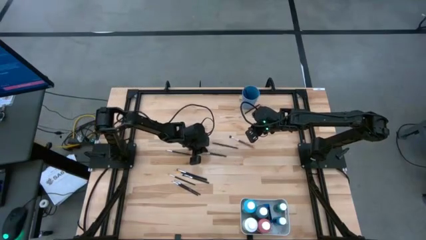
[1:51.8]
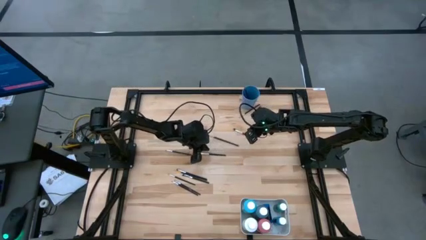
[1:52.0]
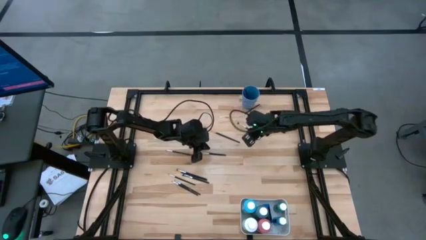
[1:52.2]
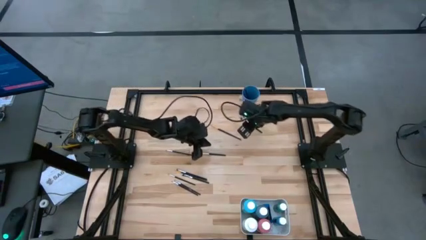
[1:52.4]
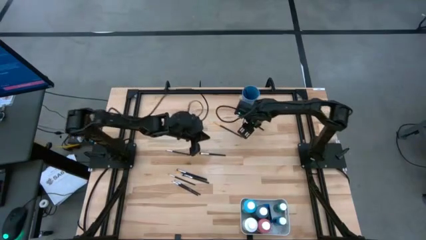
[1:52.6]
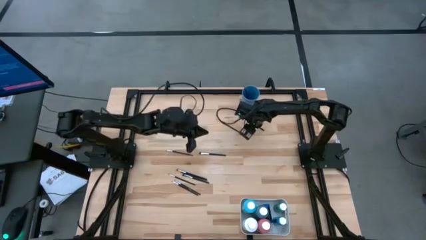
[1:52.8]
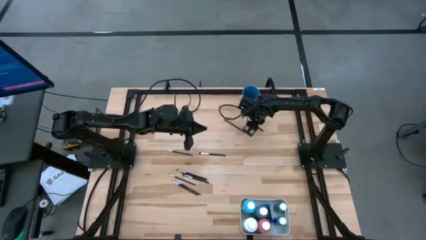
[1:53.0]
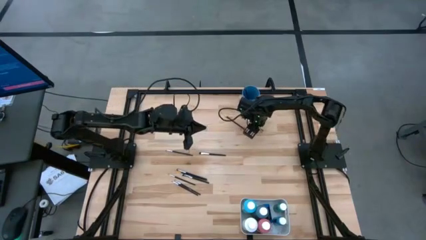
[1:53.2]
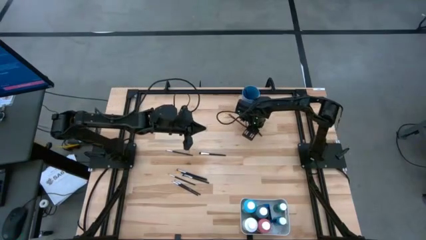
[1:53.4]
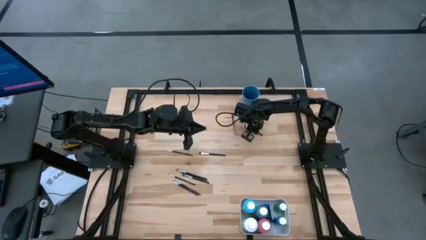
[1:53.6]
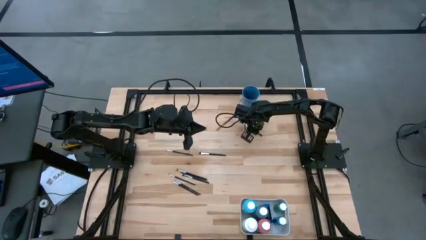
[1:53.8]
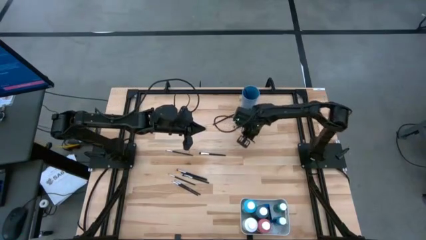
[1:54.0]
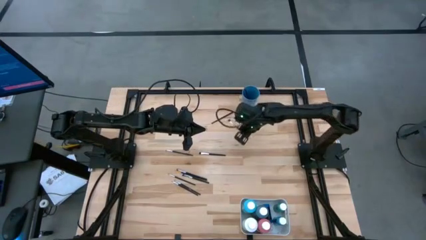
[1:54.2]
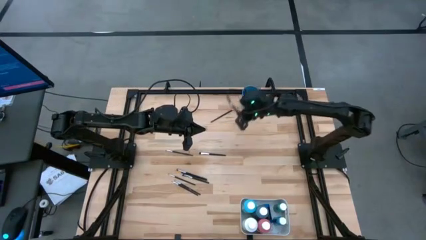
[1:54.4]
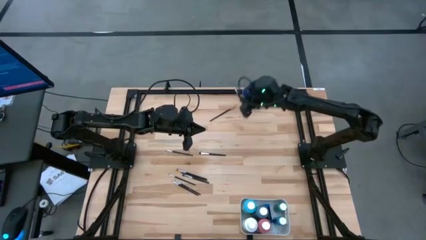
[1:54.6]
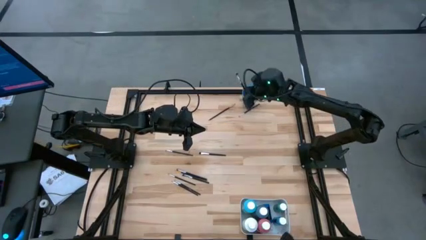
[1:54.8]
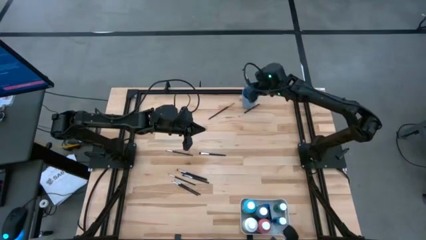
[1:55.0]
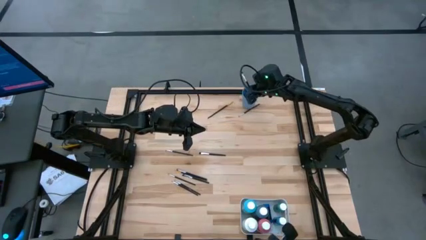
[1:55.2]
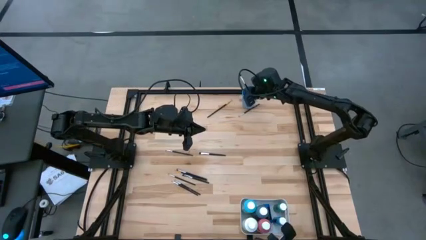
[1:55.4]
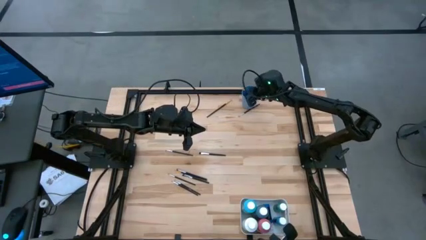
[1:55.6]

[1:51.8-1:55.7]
Task: Pick & Place Paint Supplies
Put the silver paintbrush into the blue cup

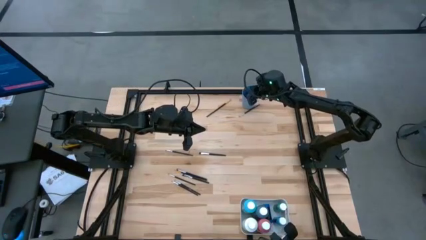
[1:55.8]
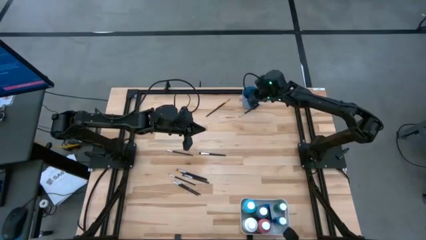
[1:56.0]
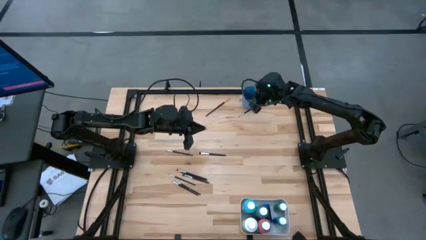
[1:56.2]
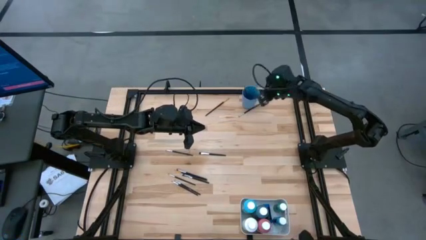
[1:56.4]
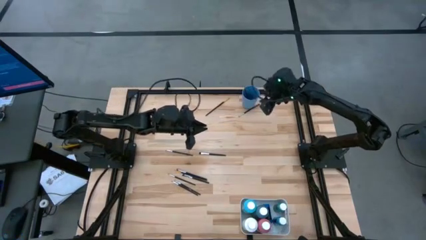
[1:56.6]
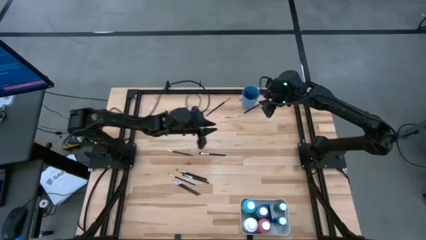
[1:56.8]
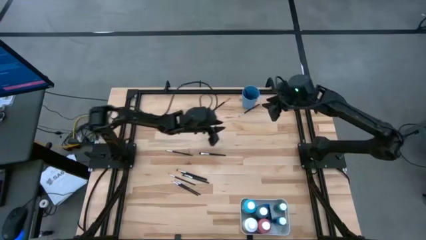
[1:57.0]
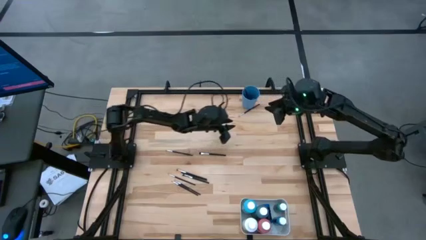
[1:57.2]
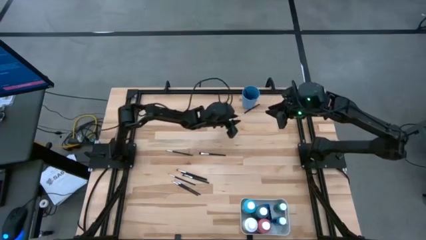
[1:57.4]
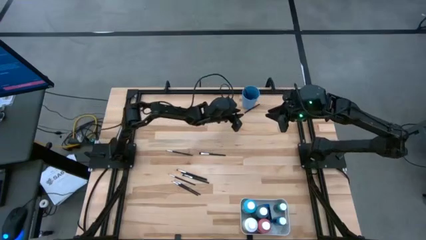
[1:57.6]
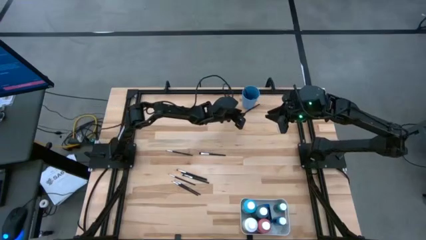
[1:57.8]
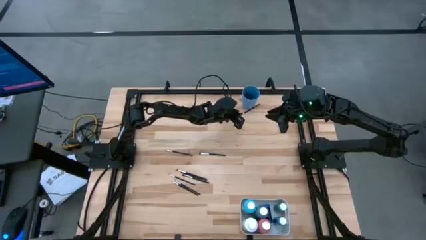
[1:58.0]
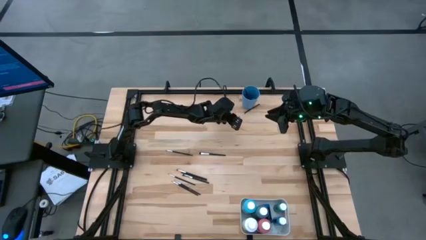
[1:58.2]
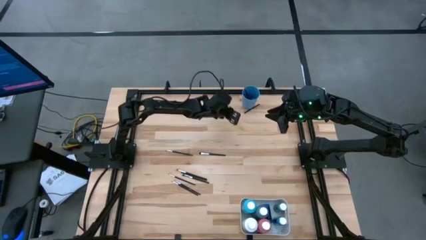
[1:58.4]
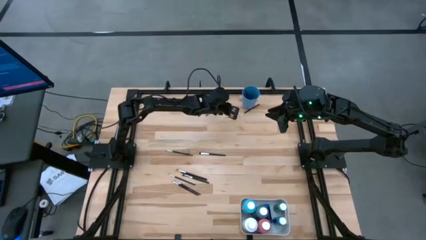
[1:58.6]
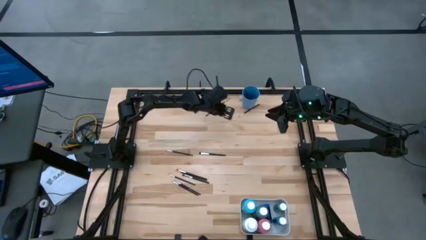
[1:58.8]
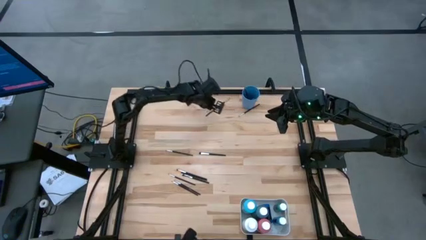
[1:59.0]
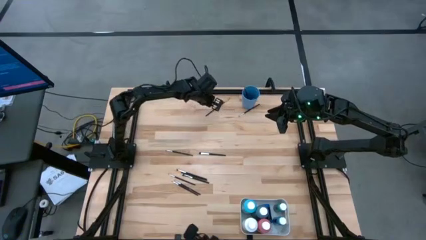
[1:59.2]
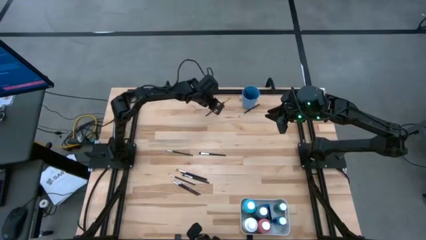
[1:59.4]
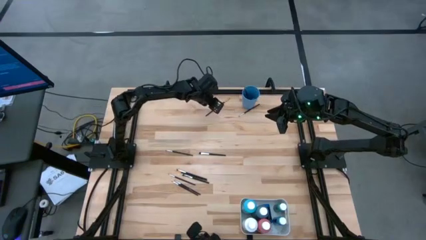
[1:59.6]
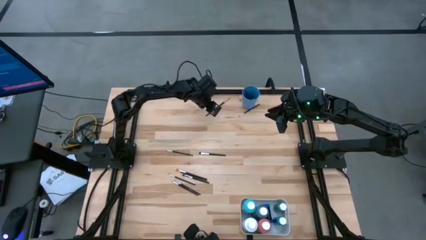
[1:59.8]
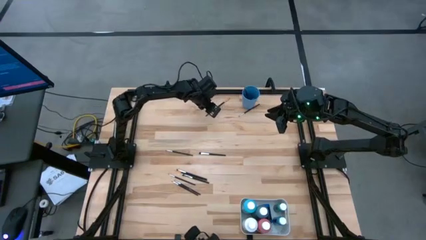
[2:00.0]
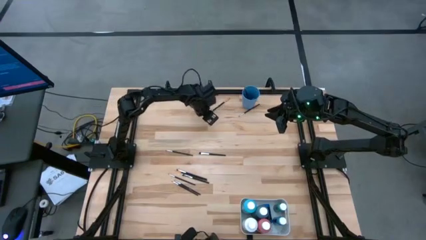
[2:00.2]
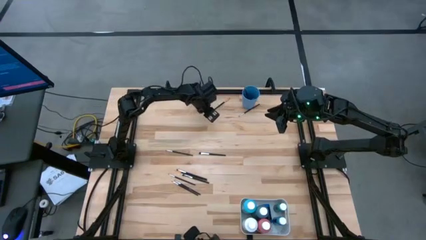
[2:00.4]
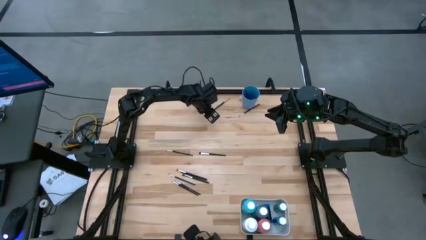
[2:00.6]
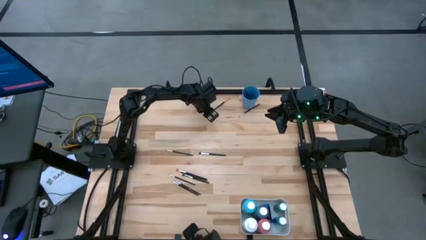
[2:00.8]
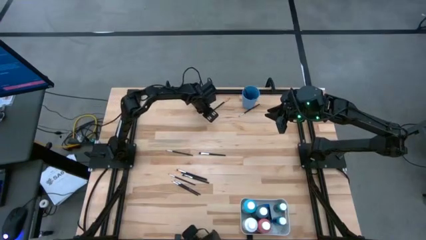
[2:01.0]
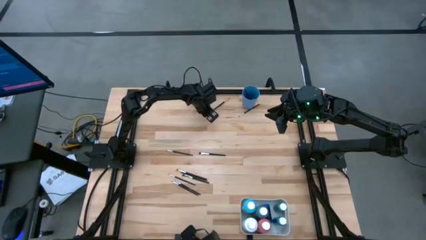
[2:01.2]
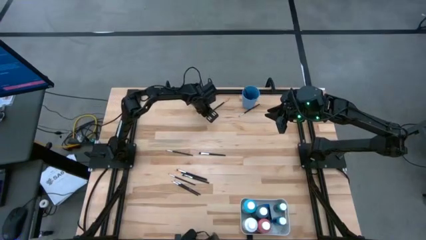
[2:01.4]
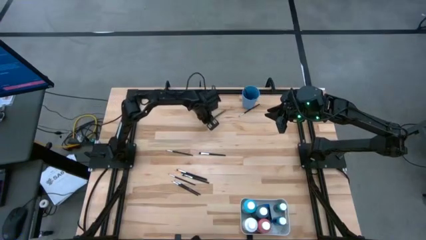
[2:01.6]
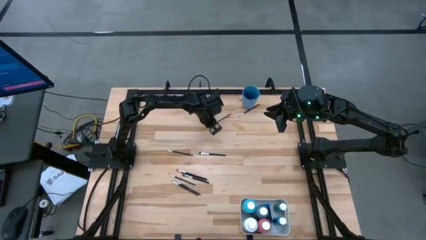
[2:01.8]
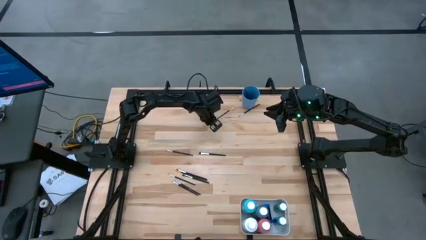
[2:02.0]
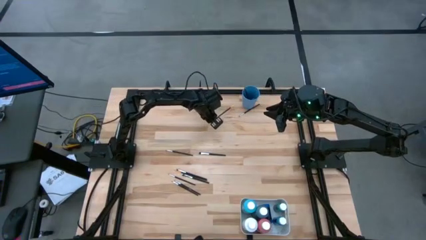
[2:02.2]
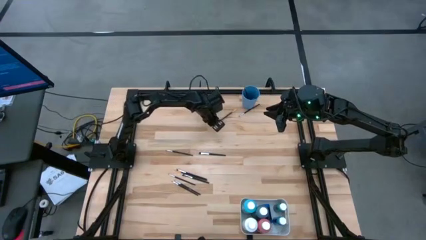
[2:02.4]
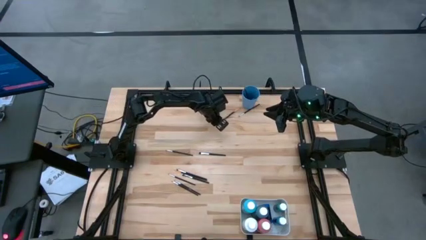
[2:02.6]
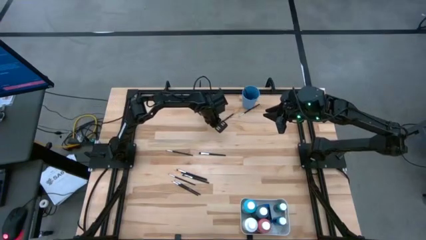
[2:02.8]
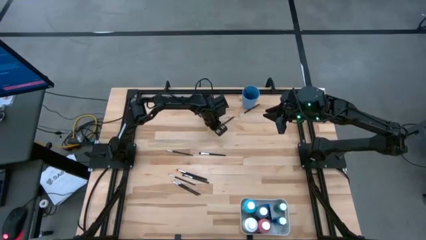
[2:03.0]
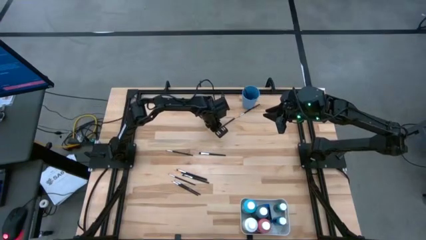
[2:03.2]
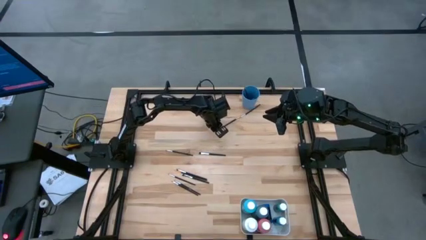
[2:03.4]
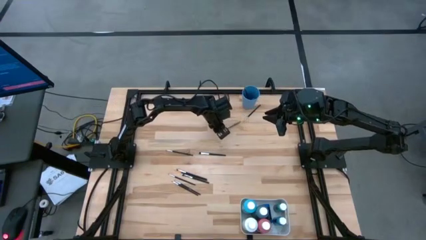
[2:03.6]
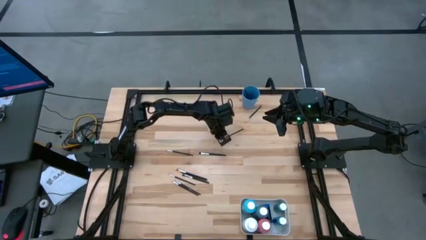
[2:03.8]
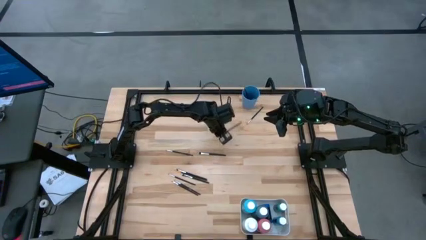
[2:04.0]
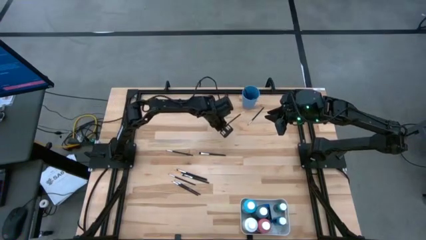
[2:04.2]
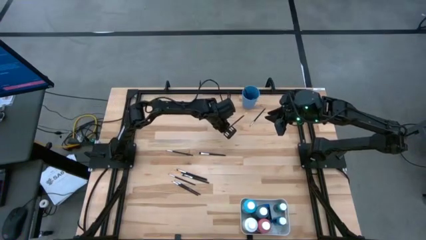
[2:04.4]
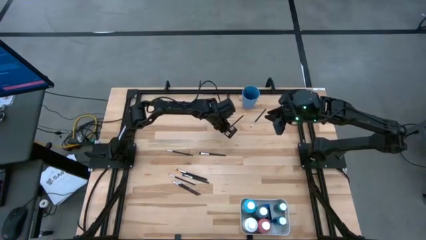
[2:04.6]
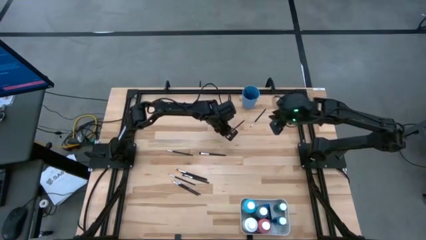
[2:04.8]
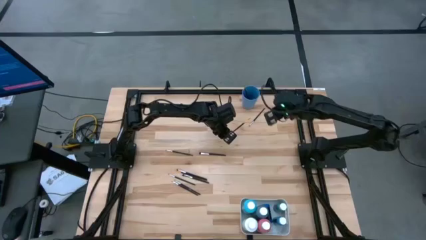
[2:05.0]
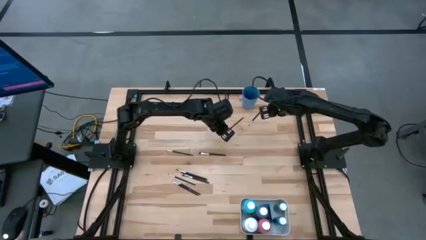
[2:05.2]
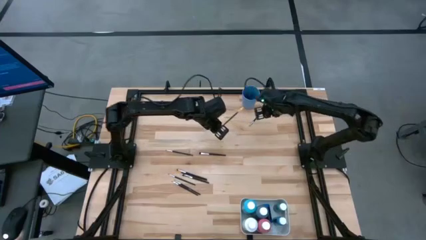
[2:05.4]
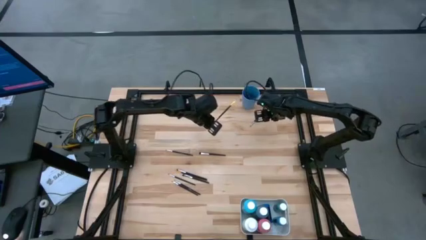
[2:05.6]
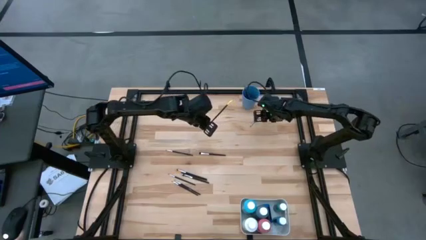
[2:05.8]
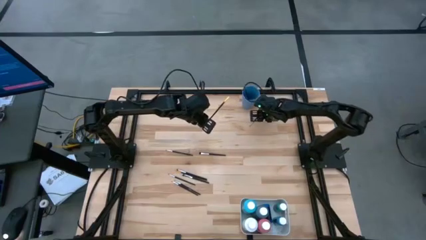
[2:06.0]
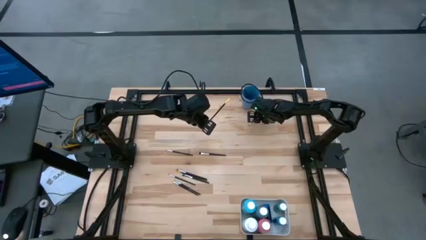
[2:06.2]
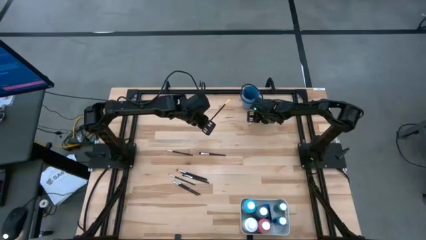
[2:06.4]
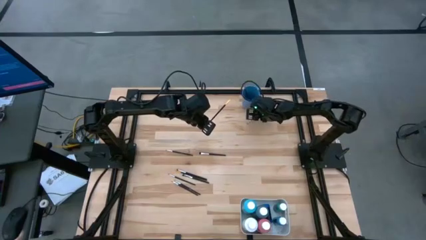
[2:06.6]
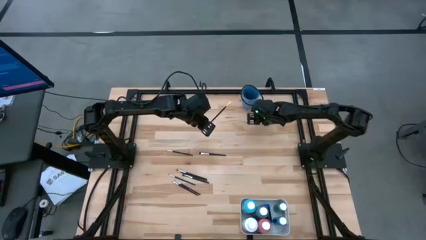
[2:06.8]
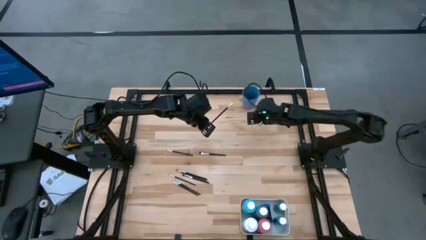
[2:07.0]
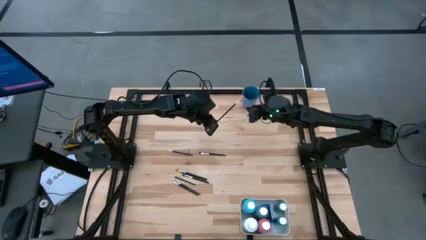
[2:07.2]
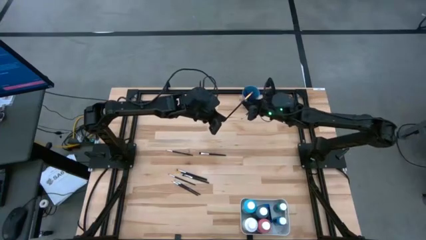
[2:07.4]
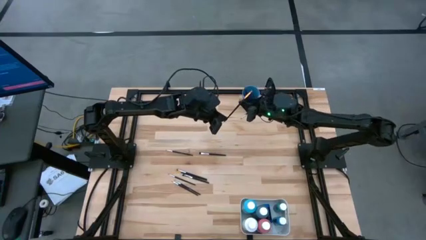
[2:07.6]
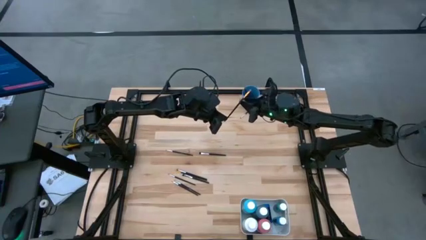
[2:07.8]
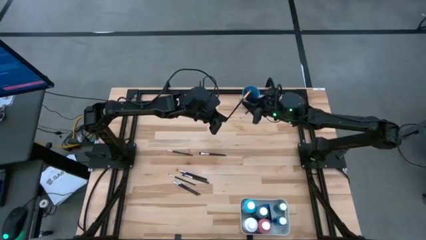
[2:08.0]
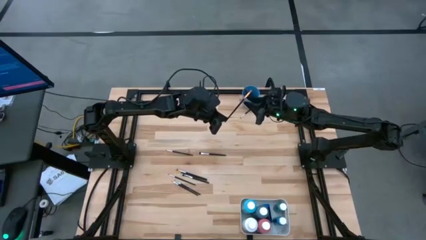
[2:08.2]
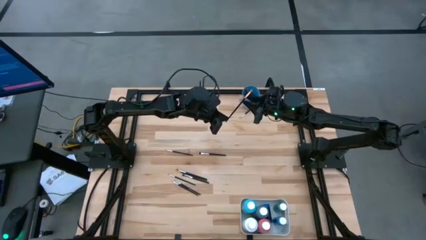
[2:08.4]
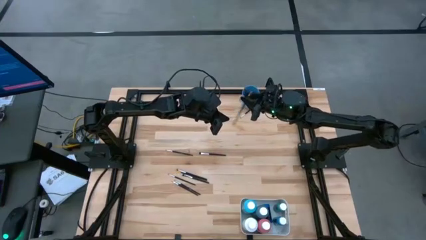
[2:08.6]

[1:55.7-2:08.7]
Put the orange paintbrush into the blue cup
